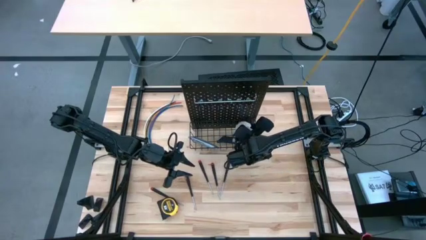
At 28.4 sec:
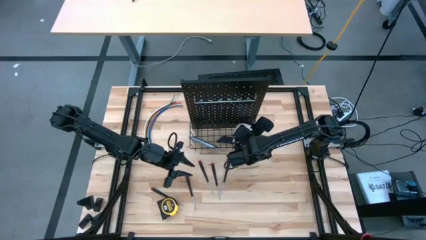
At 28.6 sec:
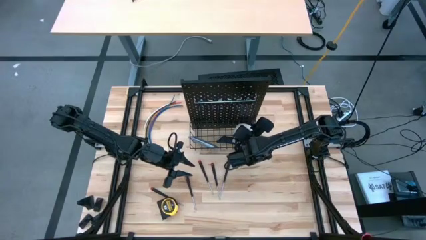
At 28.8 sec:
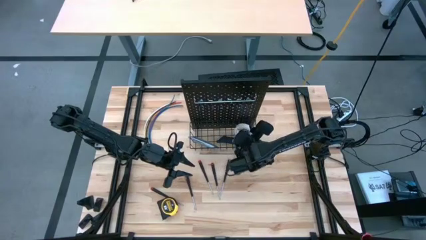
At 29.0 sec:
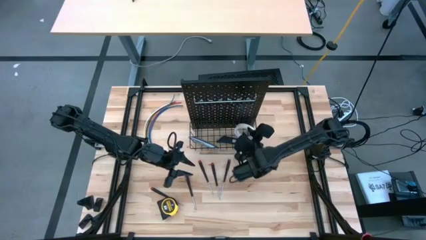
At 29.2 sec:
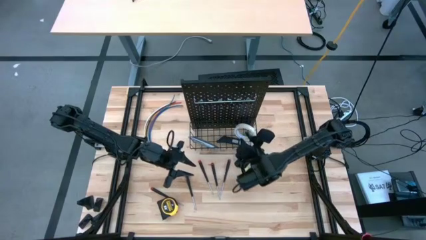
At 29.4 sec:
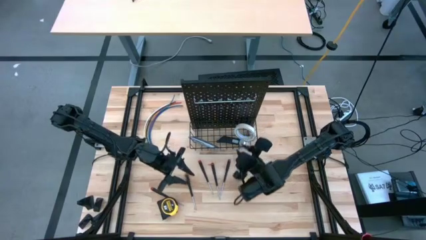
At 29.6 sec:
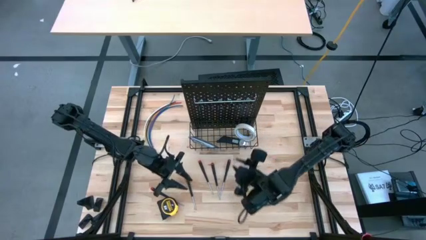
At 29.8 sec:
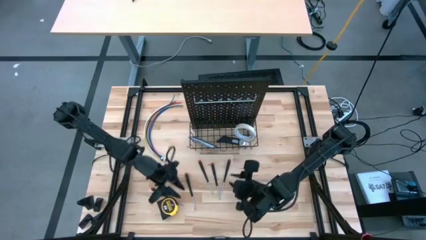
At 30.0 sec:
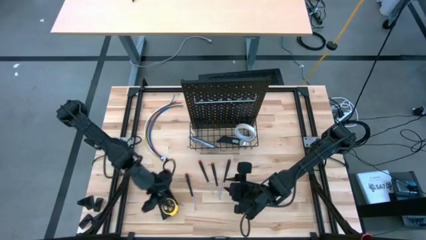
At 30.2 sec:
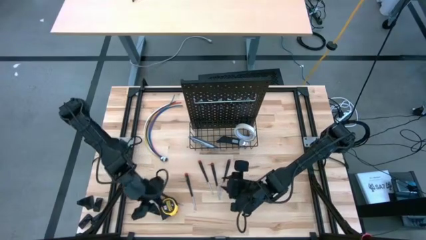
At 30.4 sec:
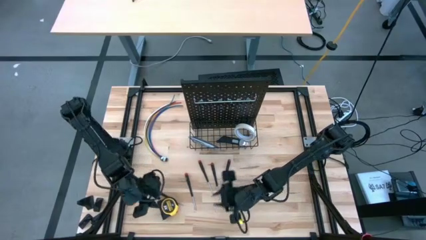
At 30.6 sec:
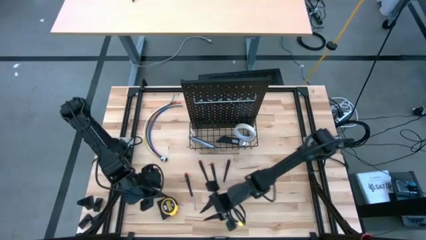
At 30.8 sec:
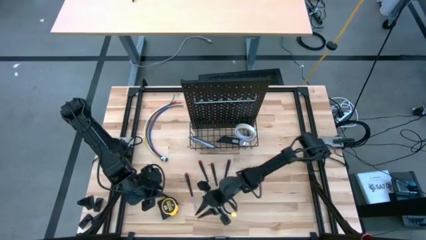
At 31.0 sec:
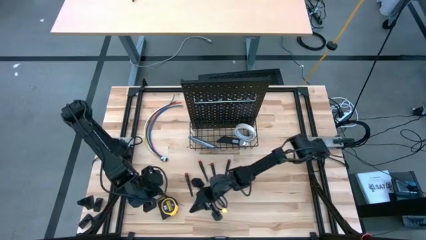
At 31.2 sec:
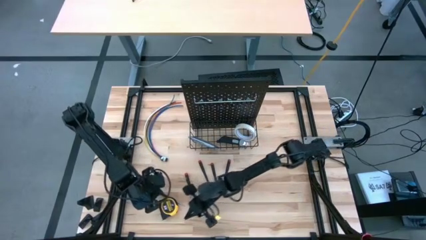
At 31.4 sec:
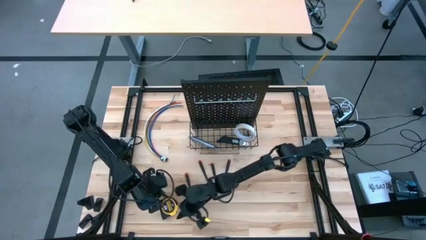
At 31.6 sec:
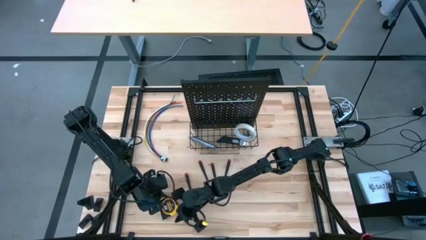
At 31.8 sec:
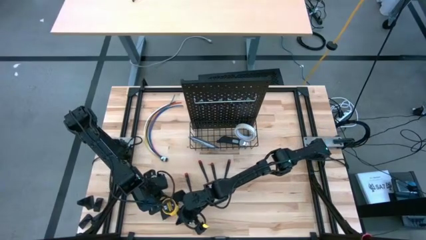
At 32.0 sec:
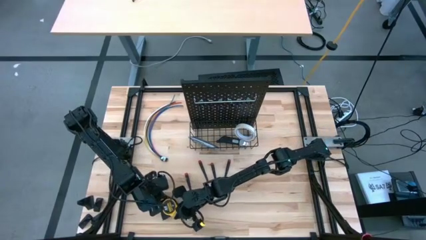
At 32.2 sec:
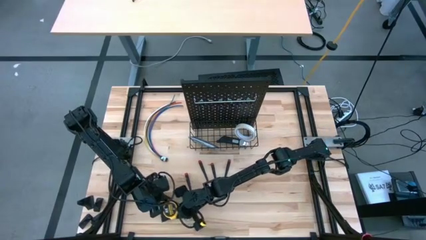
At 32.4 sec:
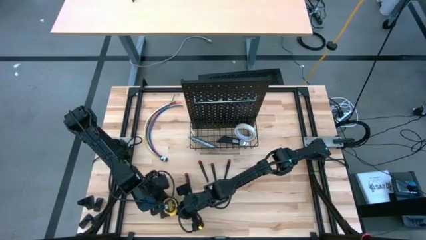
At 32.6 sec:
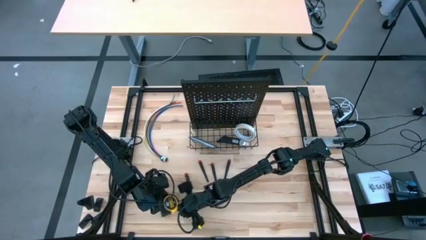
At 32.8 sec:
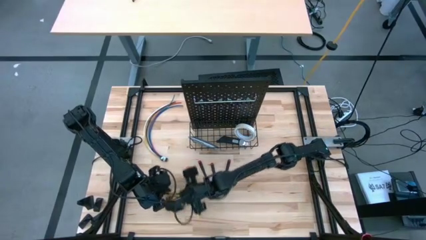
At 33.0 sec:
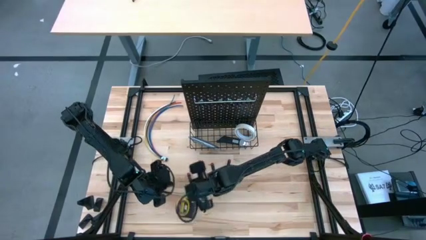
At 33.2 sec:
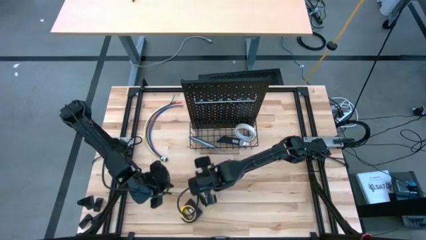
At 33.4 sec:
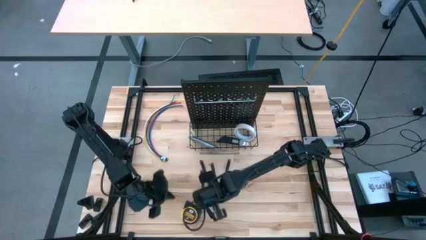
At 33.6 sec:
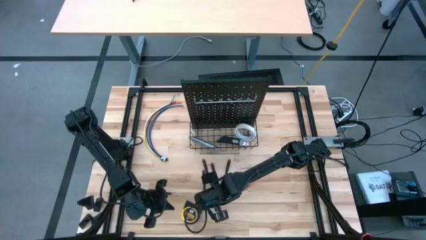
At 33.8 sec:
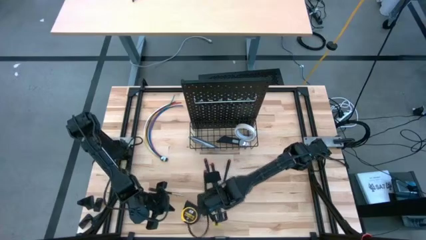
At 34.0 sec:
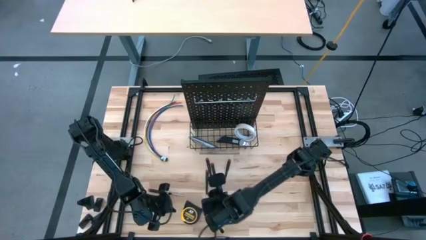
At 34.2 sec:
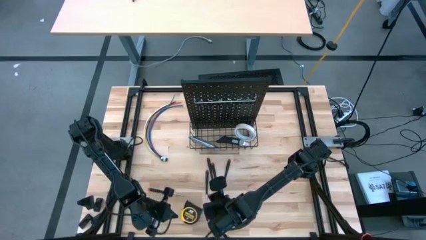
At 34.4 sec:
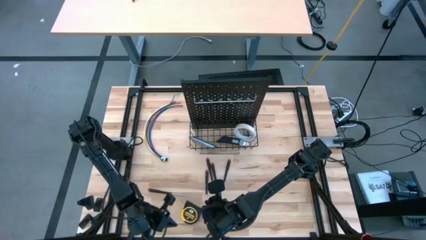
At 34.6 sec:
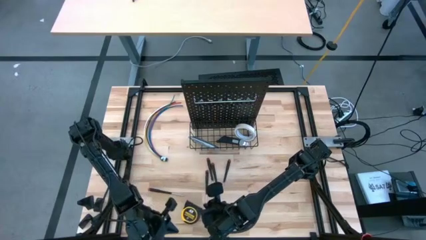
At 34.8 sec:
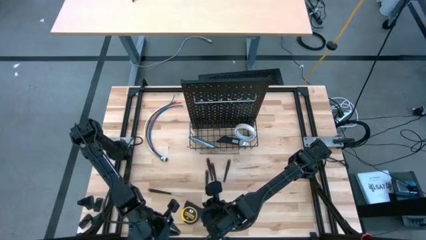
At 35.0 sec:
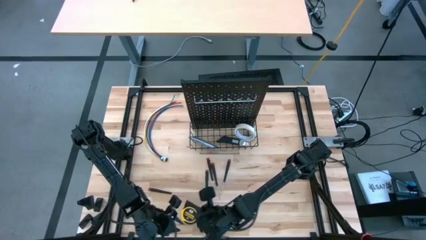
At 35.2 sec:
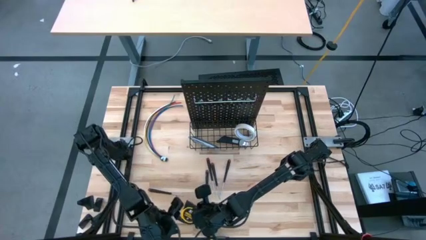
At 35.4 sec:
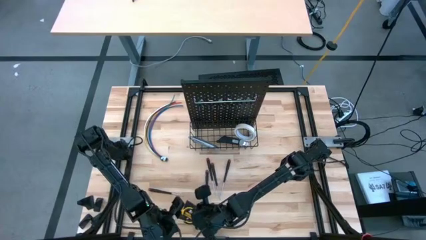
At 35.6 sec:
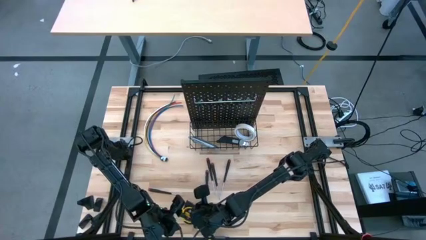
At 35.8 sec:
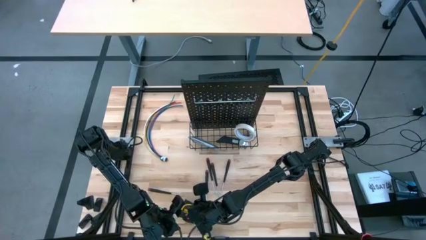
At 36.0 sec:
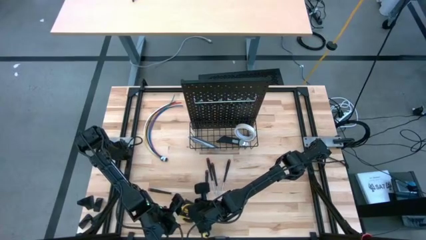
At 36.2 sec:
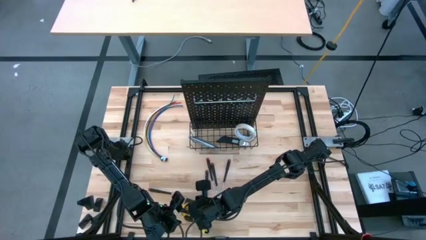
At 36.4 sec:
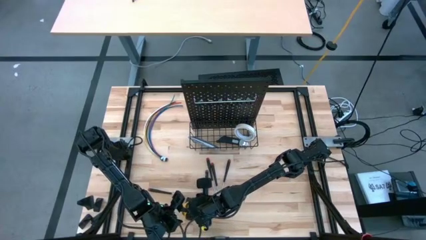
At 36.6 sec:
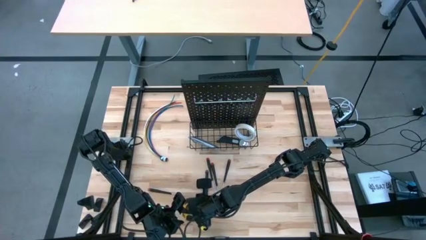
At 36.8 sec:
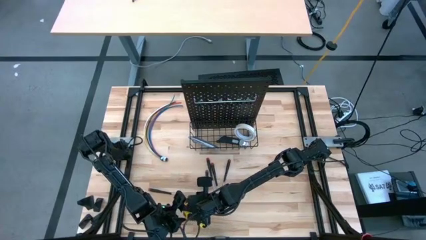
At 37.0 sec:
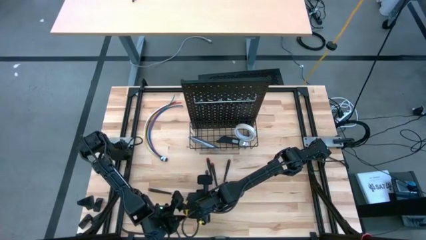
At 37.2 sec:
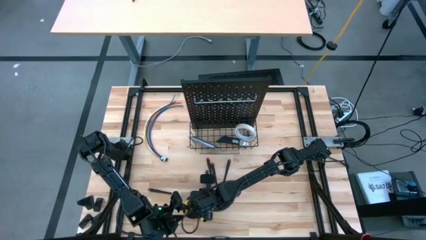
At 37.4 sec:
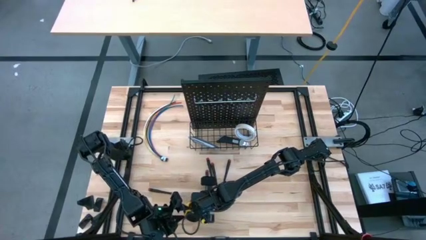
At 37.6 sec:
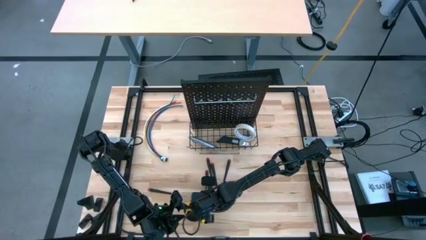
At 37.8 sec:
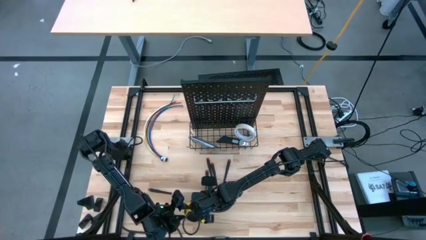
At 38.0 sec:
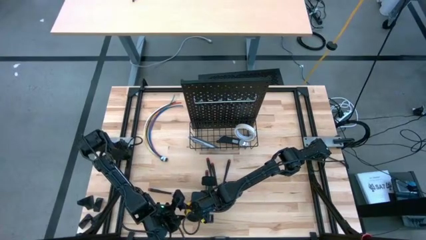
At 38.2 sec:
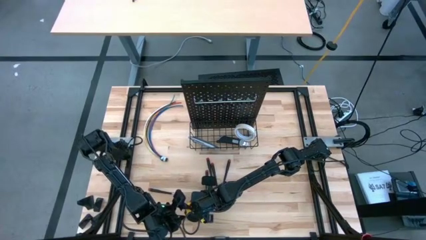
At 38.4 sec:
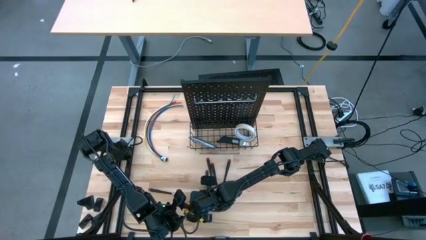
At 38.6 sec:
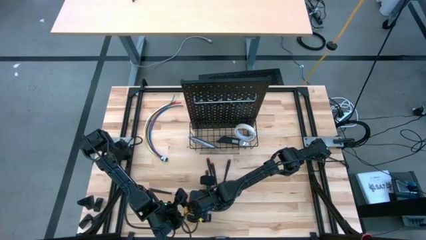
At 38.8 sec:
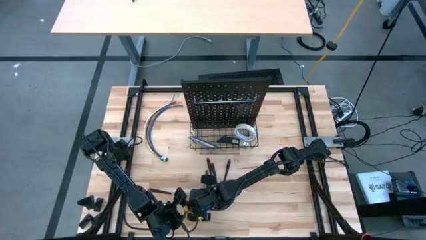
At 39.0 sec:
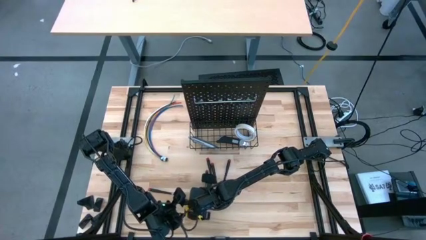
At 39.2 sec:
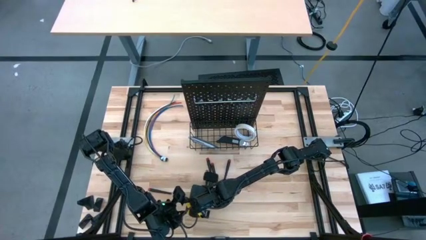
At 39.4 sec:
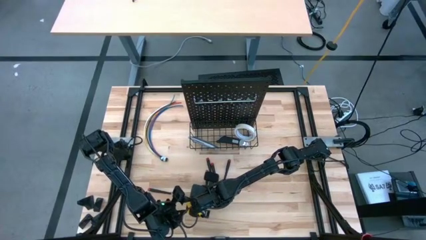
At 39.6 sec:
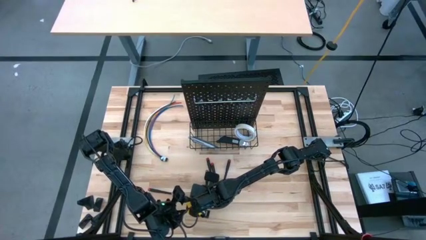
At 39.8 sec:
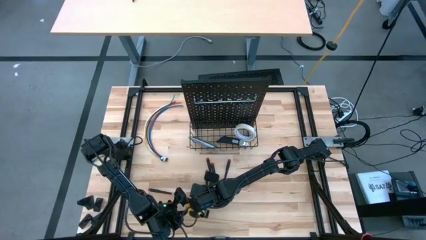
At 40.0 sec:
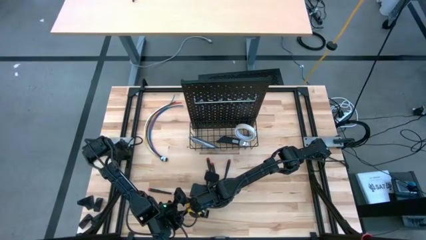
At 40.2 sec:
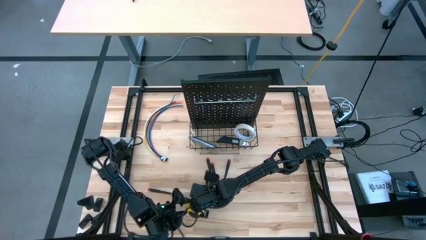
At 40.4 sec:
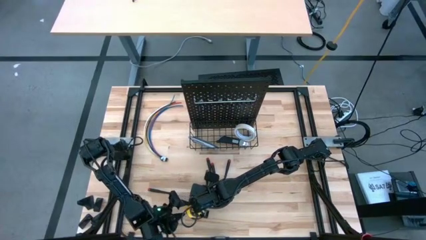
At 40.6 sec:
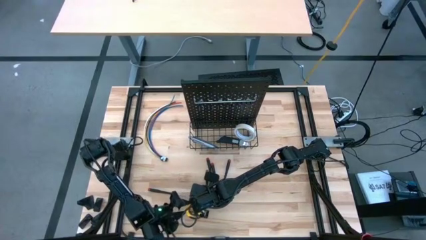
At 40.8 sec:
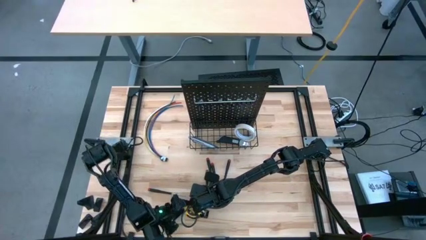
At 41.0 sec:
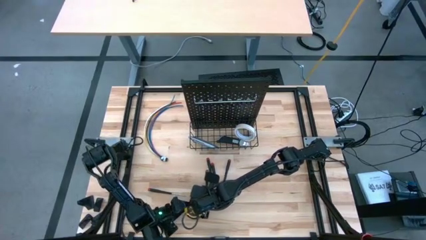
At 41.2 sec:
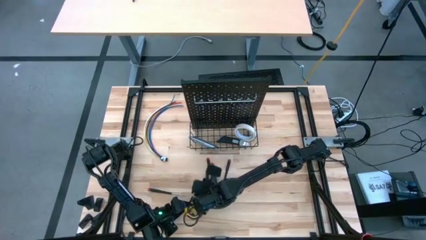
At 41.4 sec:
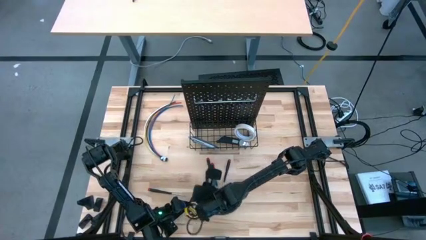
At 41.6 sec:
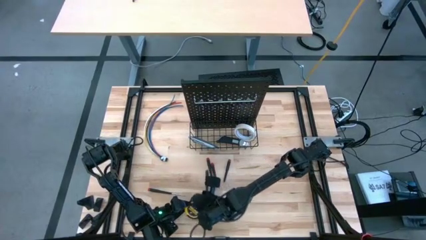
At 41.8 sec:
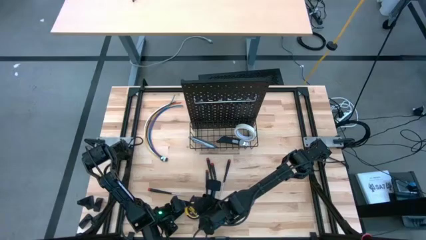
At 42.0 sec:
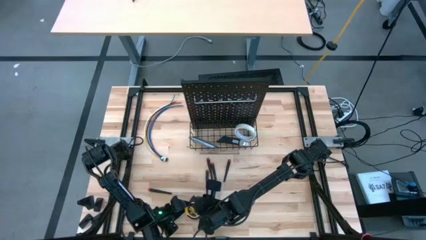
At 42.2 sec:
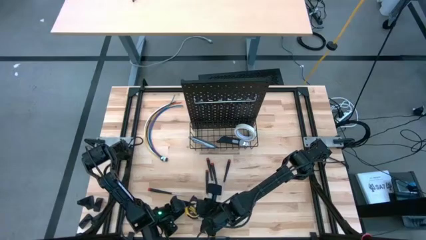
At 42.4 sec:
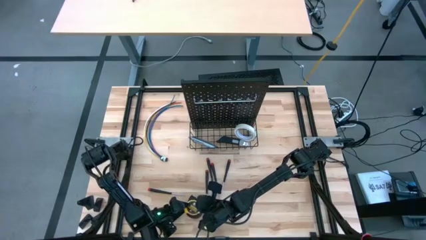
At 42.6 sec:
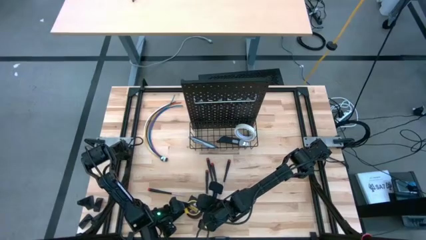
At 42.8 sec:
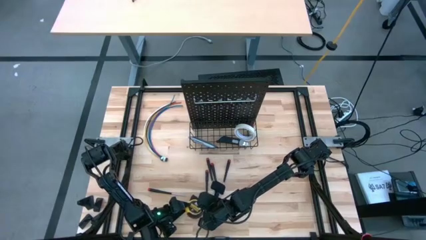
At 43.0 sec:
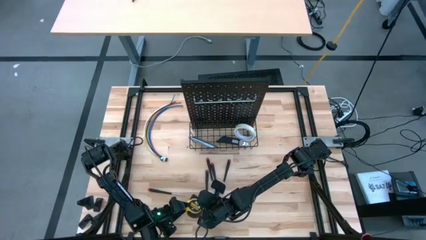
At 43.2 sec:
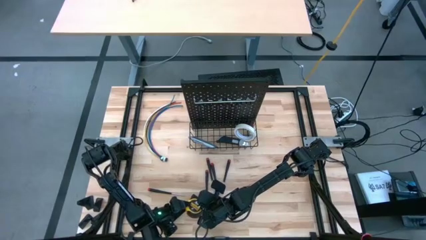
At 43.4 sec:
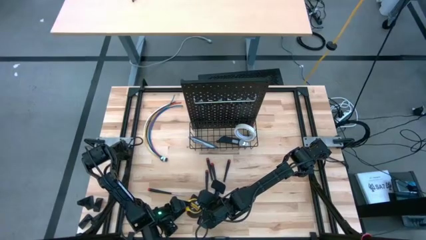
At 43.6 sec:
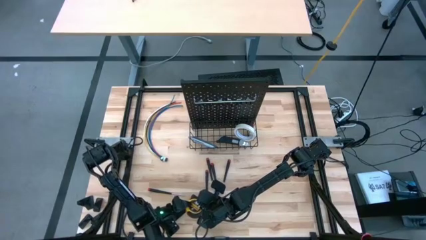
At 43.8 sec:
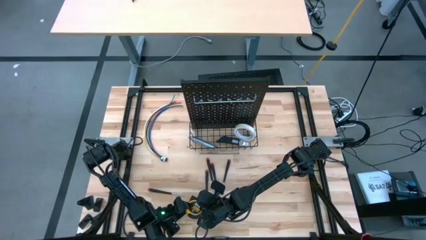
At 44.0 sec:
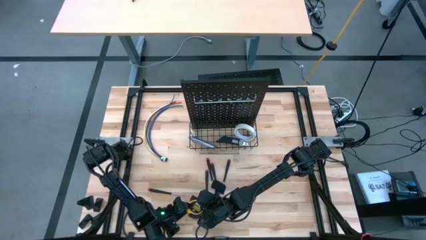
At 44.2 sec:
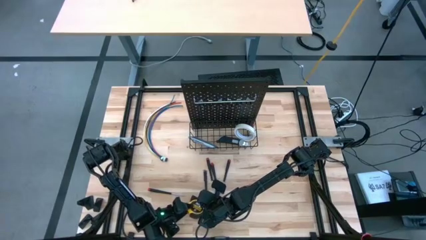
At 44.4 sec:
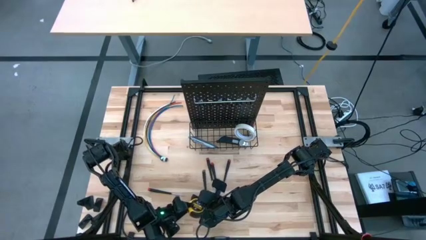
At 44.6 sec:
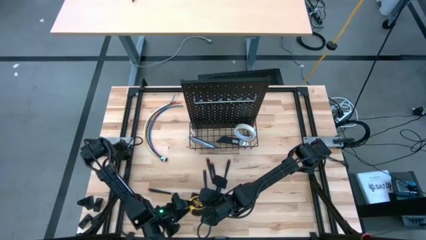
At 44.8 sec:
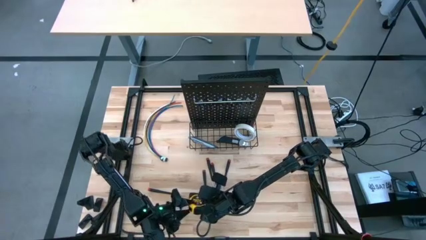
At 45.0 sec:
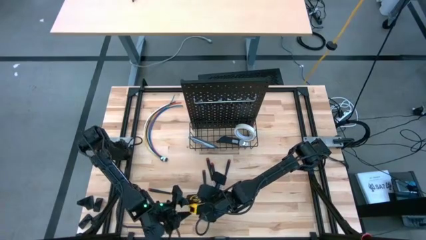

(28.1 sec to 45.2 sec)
Task: Hang tools onto peg board
Hang the tape measure onto the pegboard
